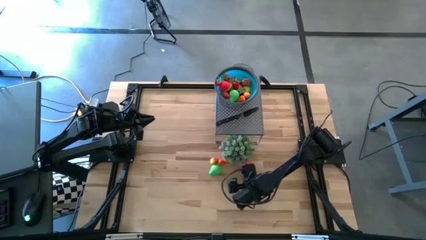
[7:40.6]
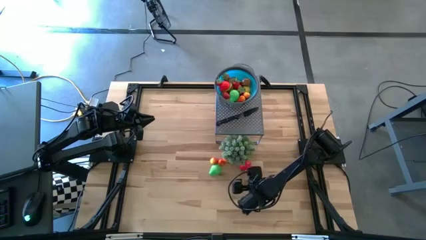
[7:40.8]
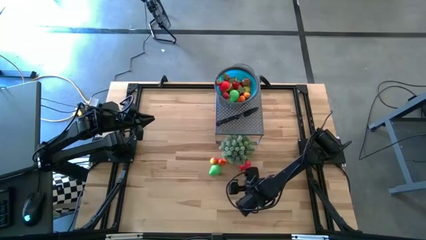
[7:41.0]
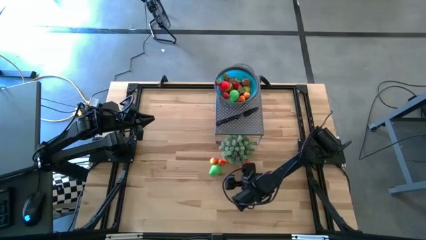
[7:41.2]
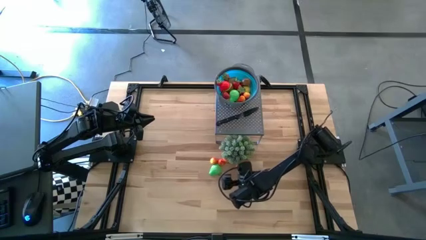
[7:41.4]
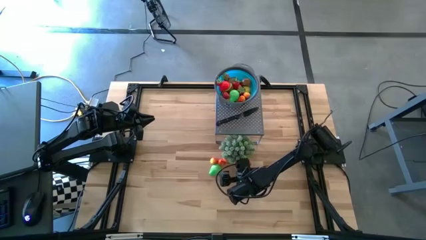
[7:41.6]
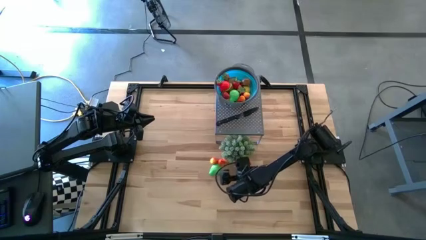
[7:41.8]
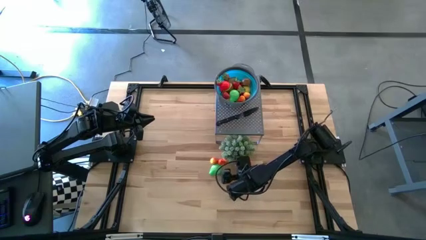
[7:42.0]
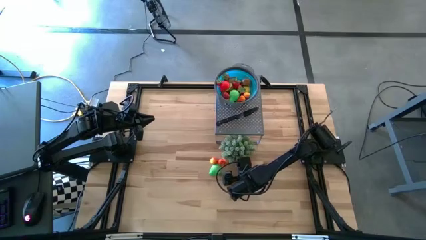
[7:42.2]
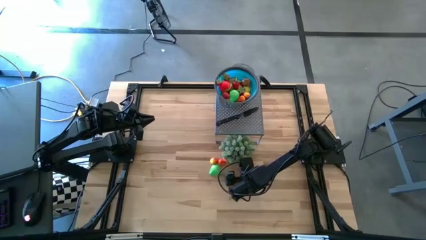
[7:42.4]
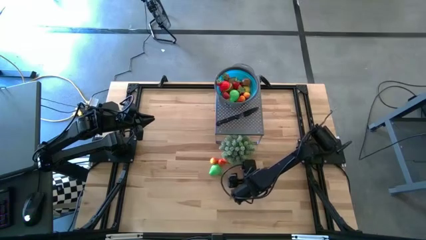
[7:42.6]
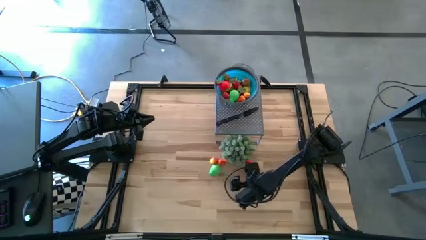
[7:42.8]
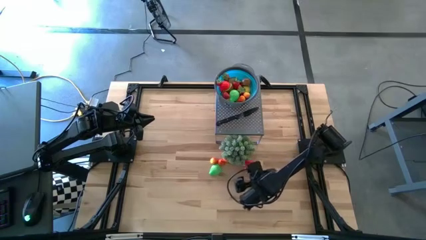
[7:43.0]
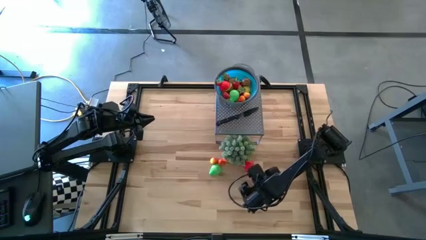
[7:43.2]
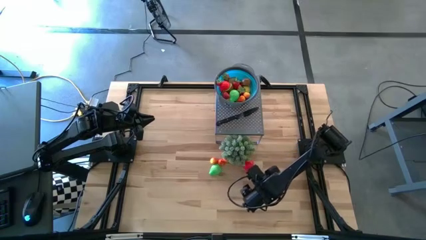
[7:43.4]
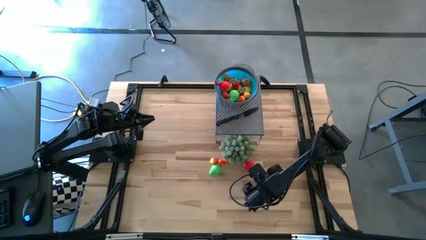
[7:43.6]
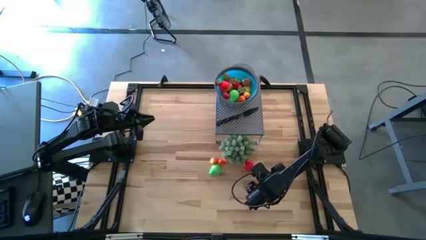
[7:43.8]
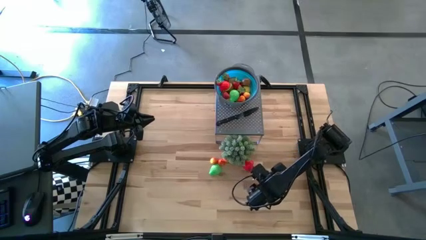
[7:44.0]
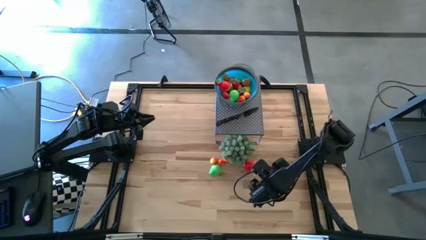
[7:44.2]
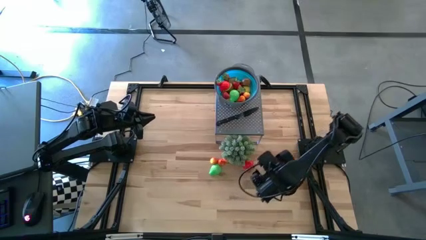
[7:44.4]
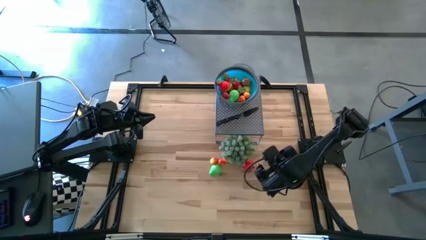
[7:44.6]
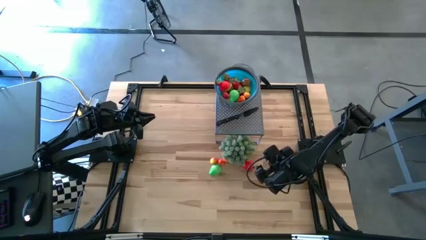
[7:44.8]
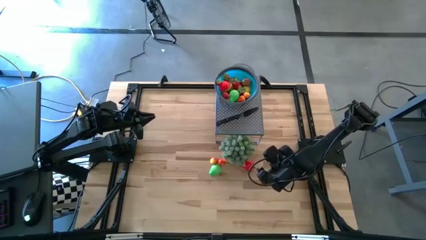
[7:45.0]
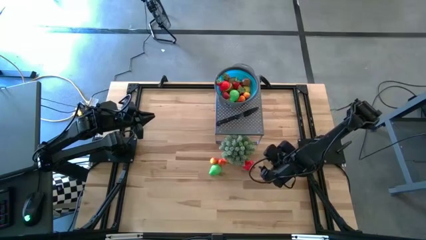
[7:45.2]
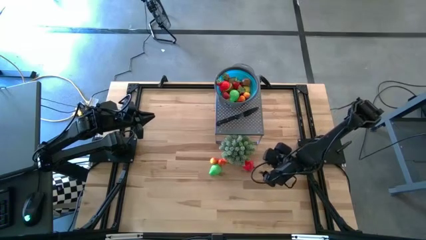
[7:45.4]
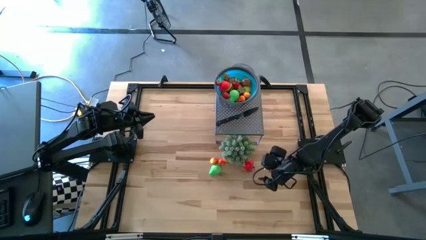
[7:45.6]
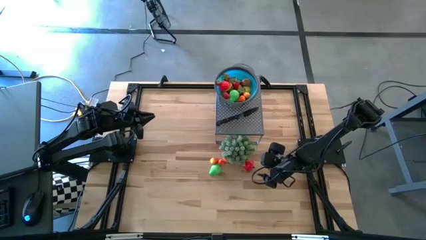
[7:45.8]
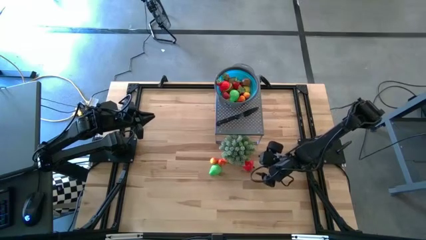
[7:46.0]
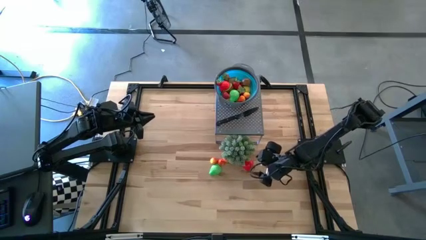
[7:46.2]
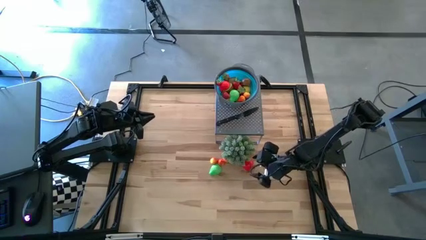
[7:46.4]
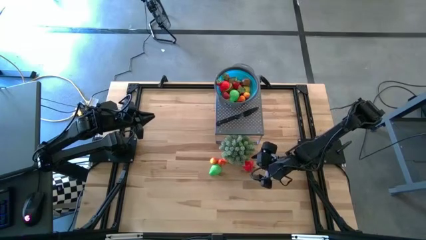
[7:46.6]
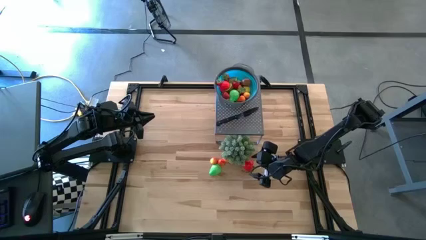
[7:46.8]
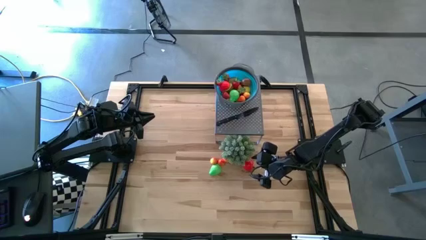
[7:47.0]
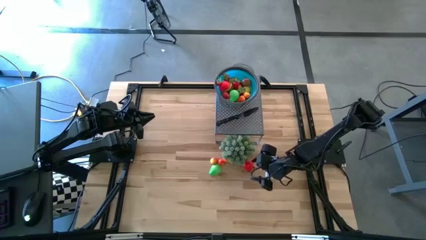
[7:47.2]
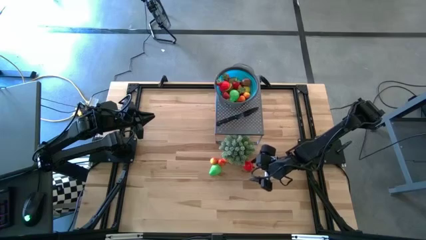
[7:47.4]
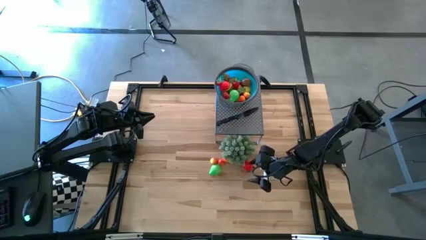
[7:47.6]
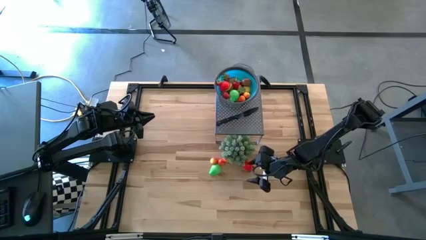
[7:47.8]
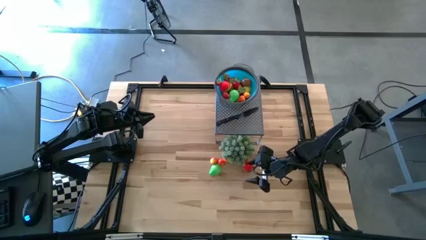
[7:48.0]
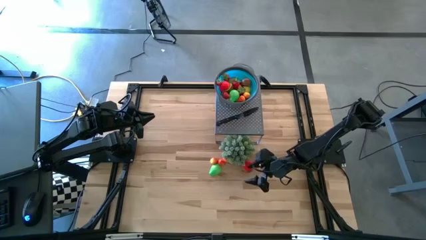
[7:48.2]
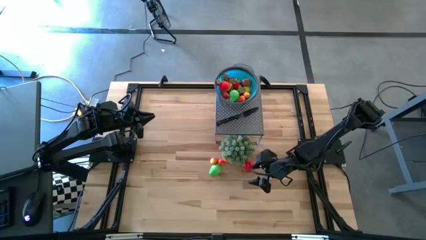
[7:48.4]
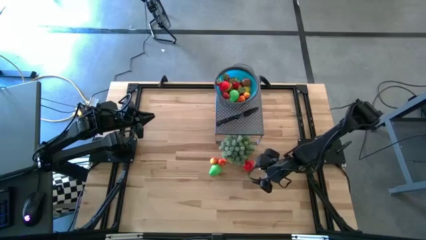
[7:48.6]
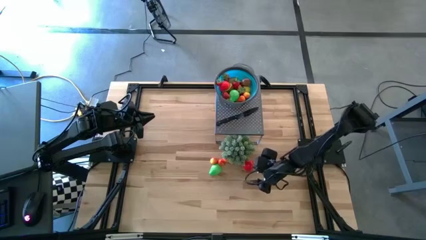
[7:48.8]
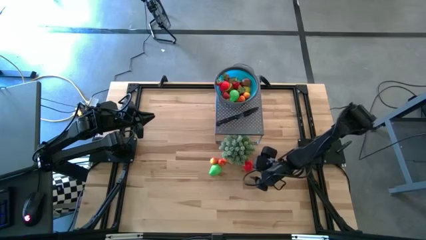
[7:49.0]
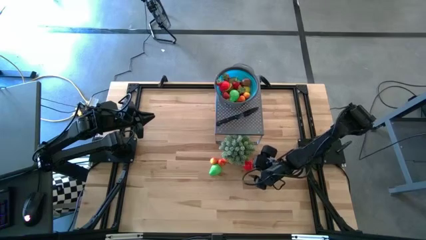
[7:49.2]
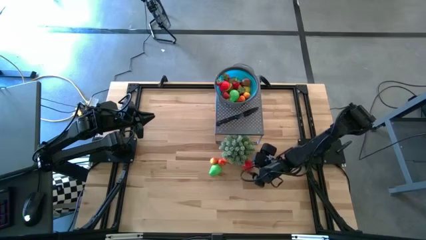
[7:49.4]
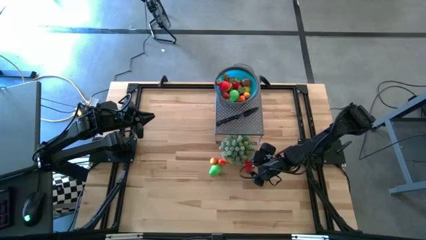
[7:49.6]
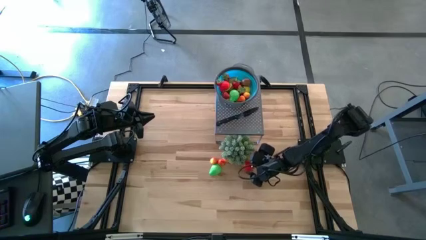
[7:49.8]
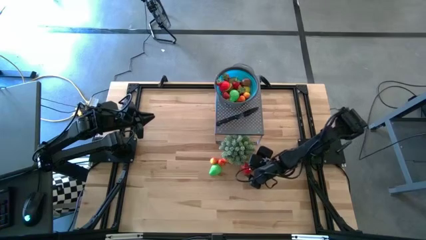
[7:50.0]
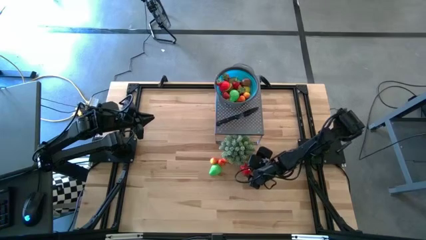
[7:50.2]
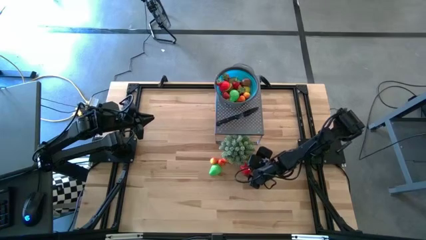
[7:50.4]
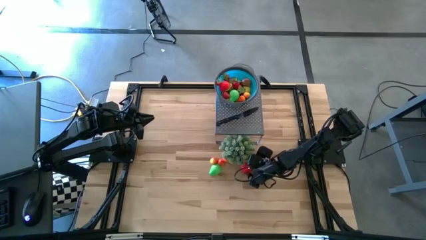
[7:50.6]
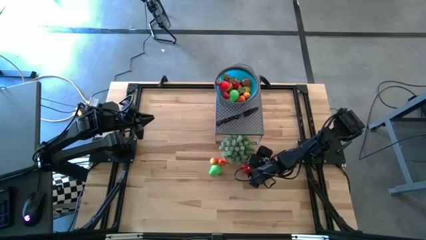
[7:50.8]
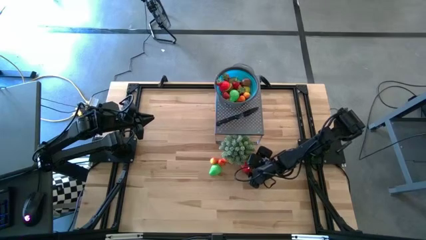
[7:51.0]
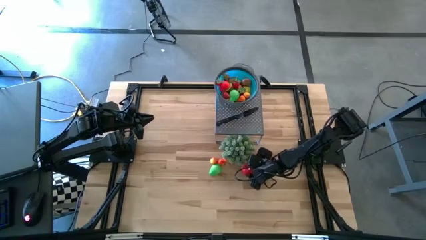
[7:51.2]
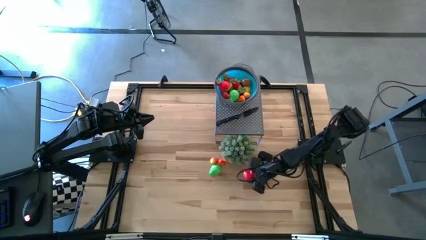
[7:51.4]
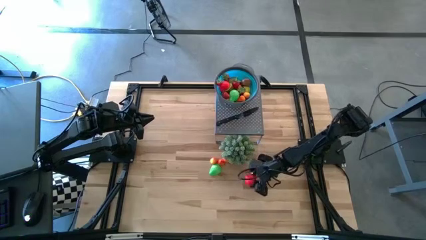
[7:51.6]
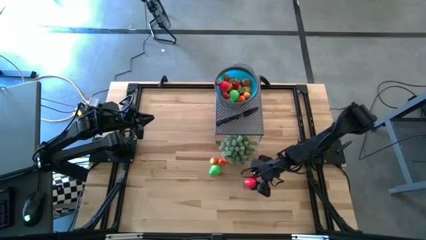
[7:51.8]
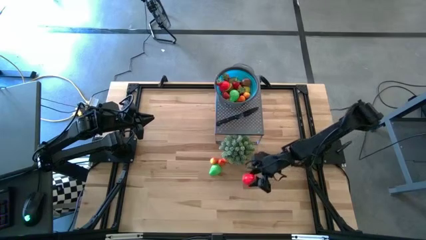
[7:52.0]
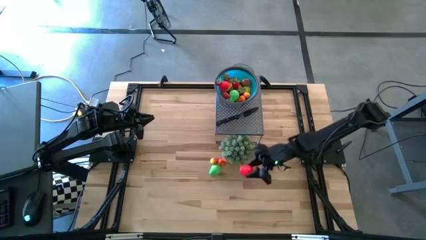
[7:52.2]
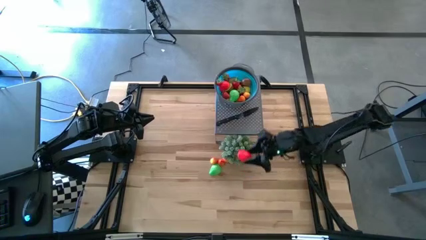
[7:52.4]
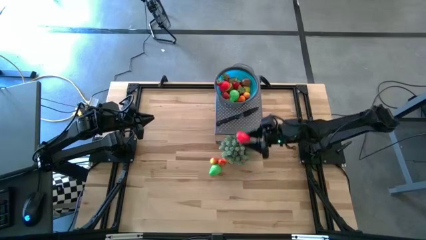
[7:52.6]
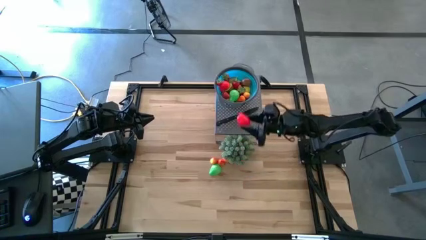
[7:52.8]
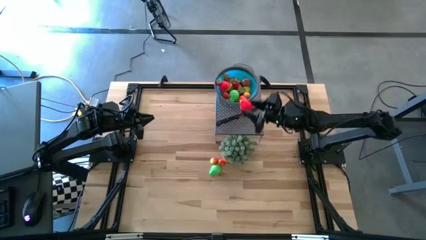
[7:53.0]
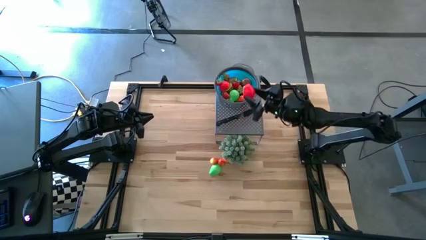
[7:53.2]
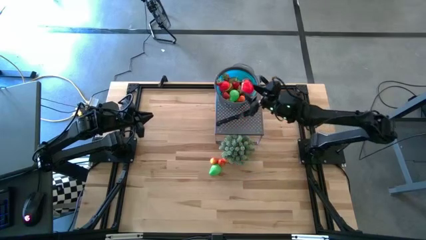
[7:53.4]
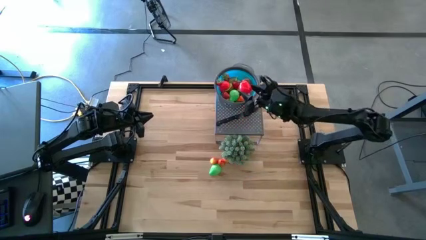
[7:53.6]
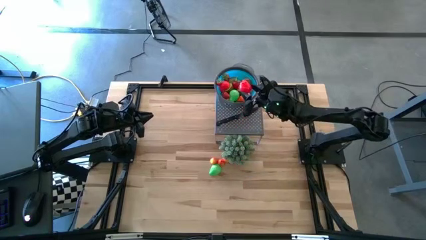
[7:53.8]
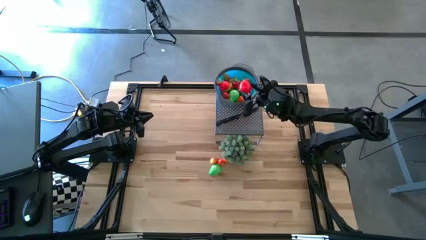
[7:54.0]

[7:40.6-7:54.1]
Task: Pick & Place Fruit
Put the red apple into the blue strainer bowl

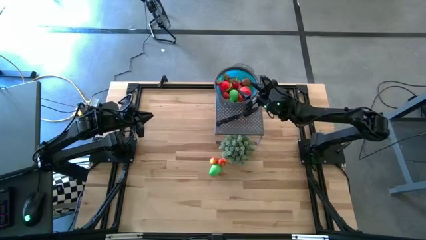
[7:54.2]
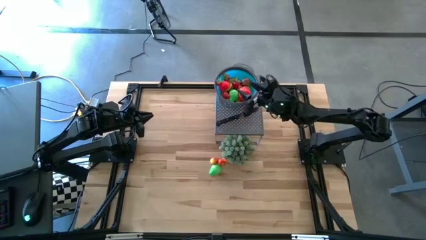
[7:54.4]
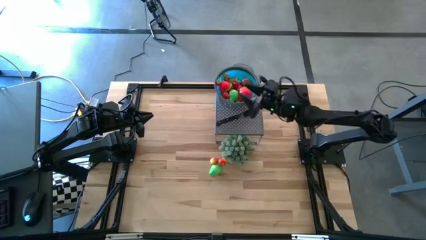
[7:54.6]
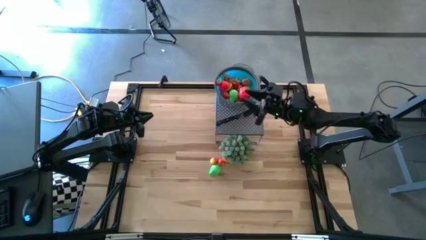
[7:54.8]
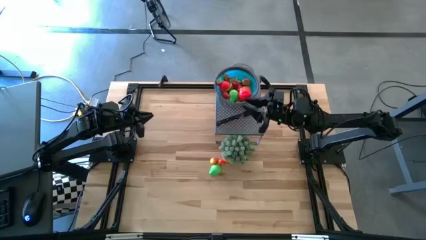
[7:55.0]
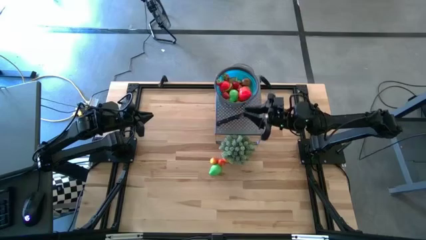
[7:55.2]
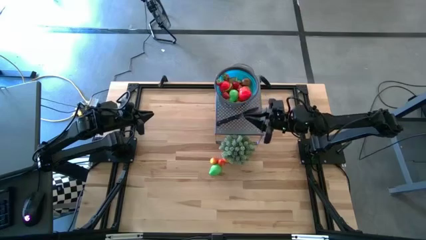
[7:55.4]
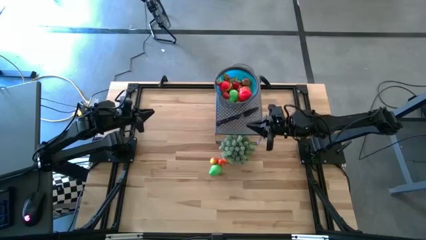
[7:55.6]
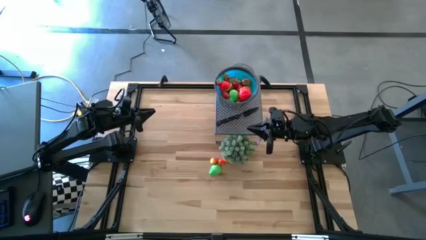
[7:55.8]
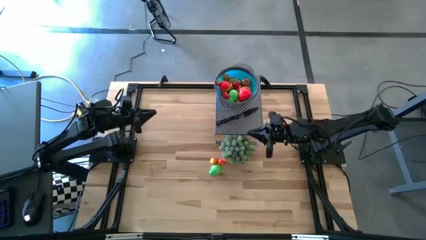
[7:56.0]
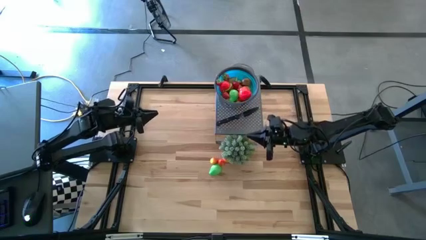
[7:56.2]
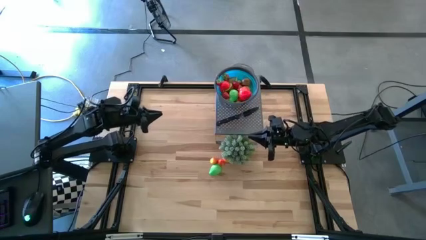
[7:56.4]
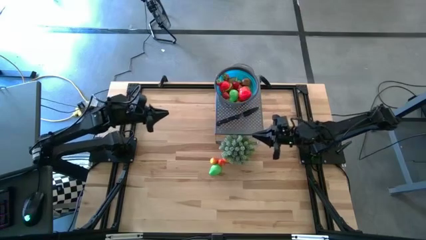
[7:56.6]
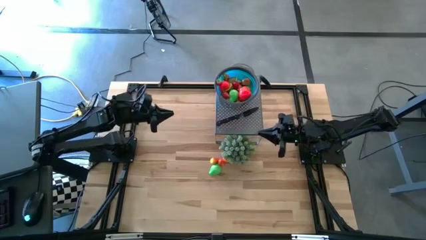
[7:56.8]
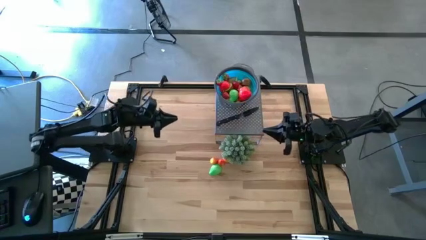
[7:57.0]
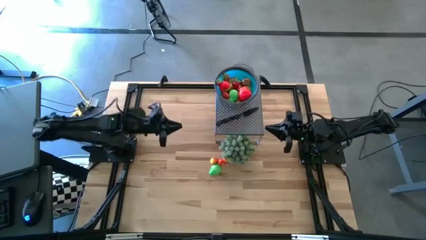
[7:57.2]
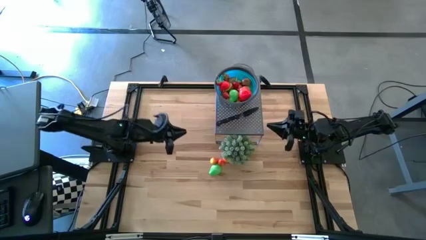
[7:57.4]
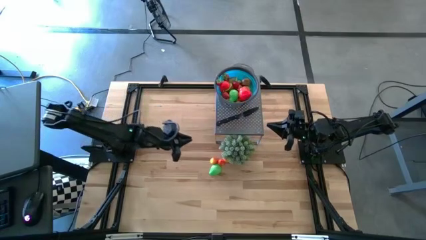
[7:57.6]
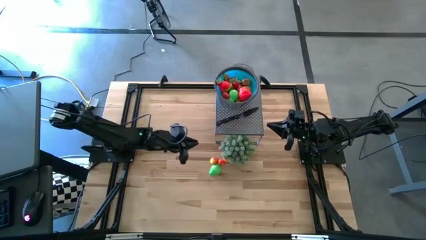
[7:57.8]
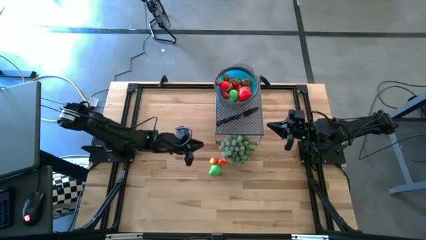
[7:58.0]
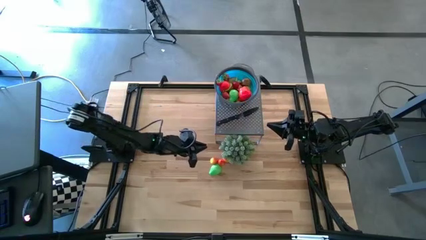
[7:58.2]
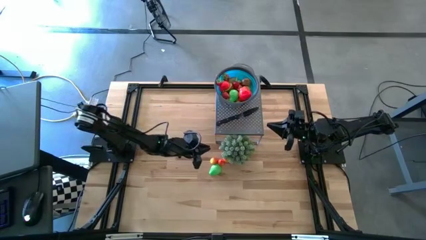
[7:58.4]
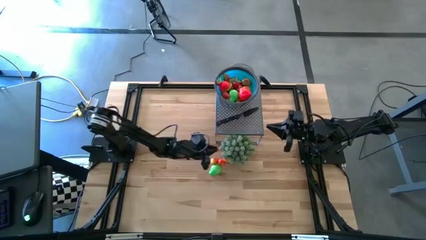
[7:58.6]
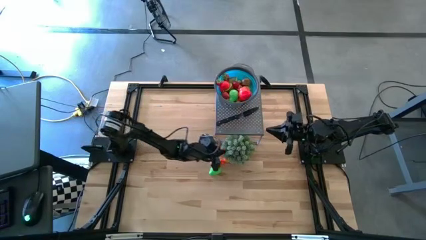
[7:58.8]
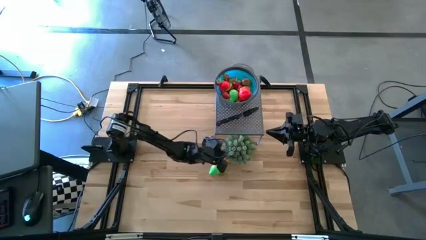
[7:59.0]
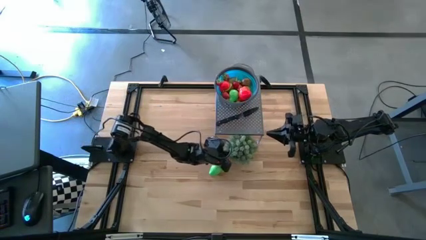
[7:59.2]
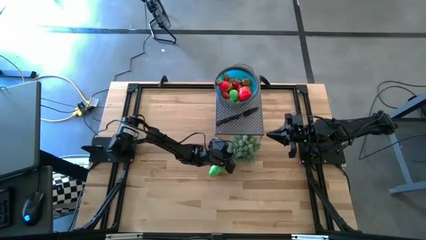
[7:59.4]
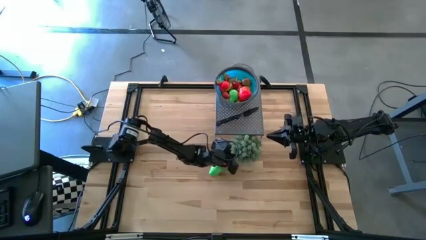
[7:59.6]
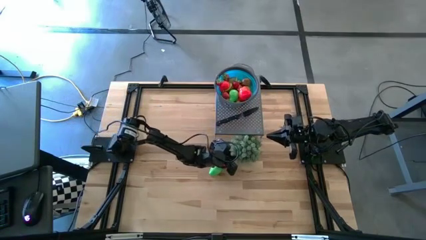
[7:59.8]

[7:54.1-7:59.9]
Adjust the white patterned flower vase to the right
